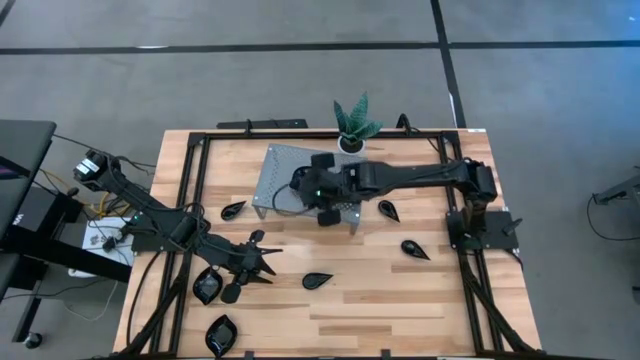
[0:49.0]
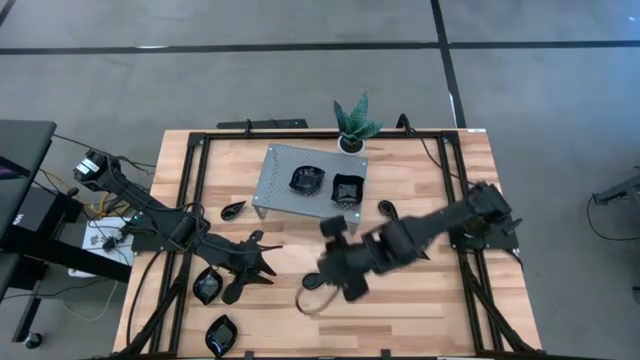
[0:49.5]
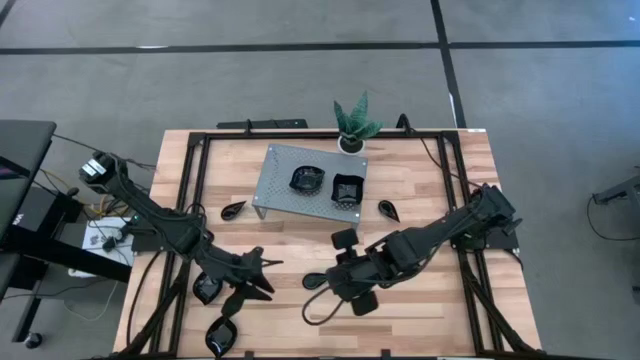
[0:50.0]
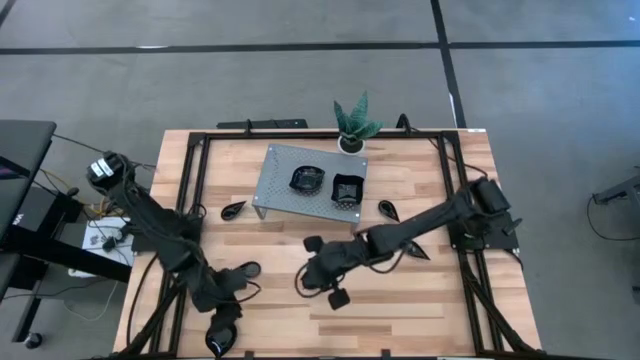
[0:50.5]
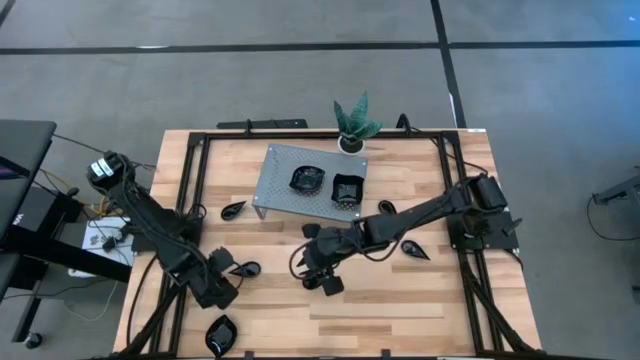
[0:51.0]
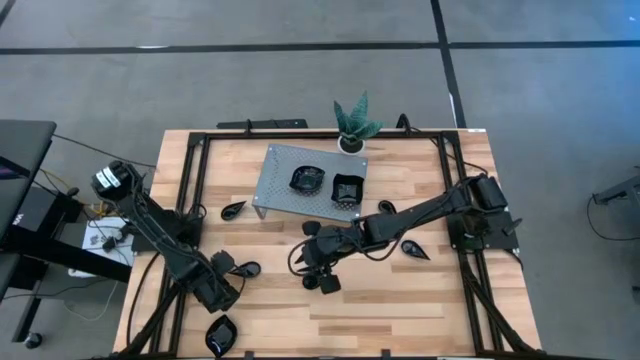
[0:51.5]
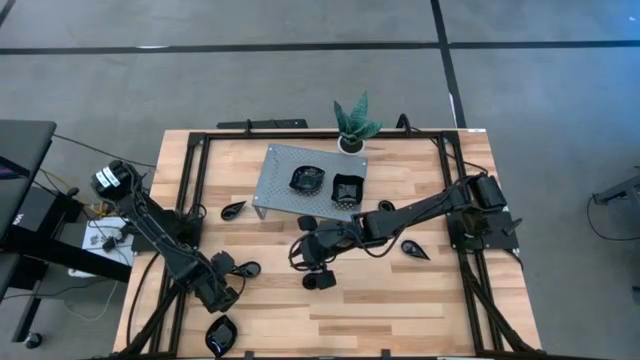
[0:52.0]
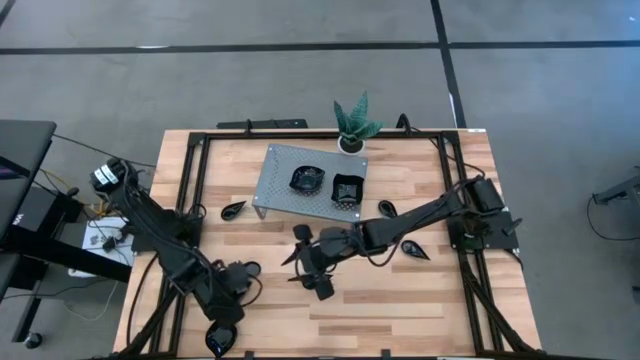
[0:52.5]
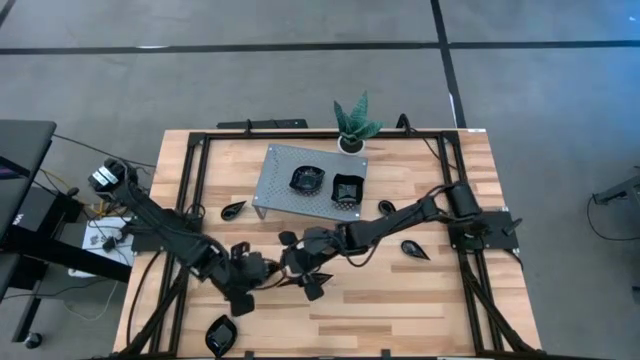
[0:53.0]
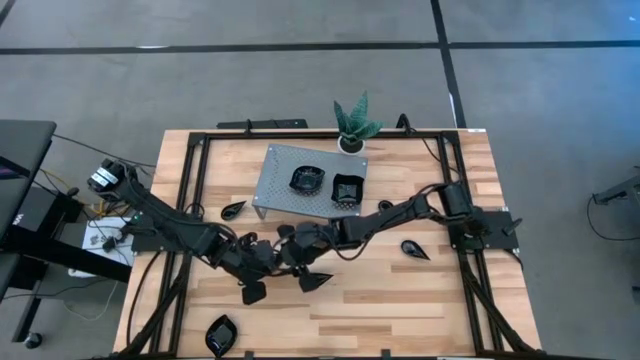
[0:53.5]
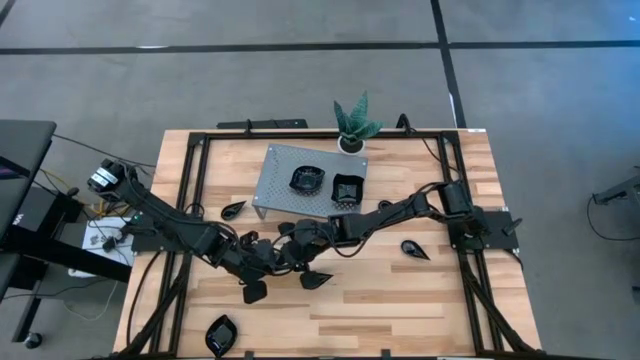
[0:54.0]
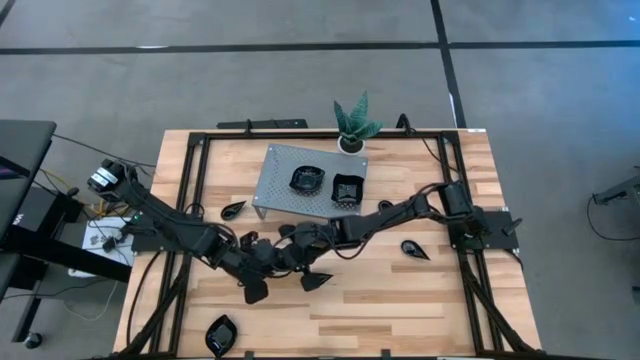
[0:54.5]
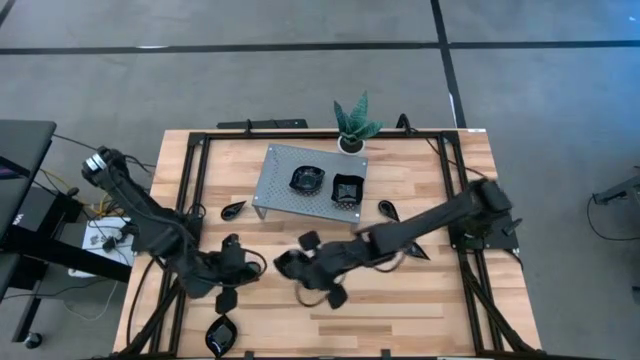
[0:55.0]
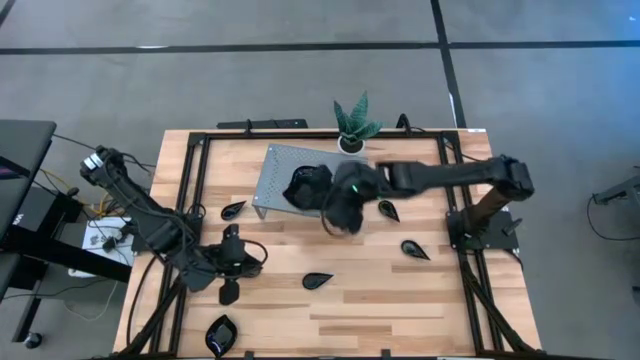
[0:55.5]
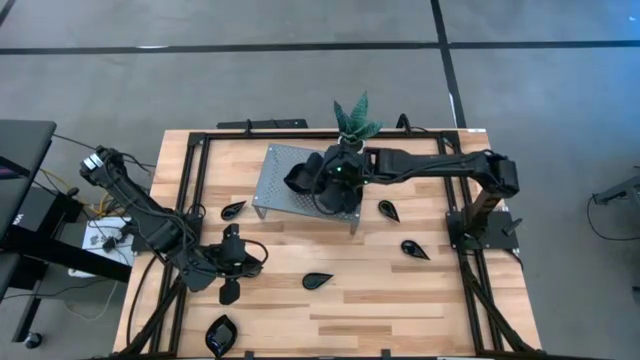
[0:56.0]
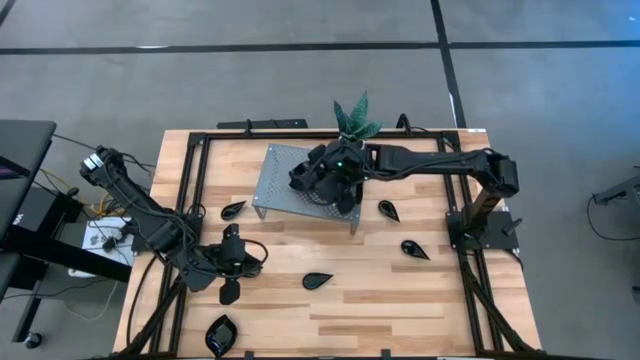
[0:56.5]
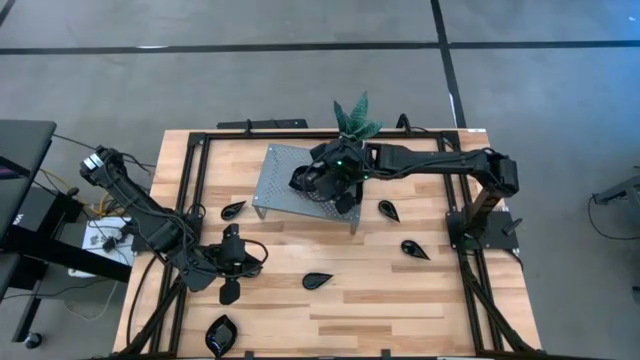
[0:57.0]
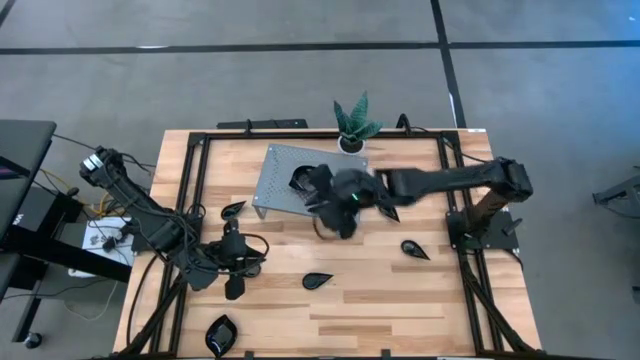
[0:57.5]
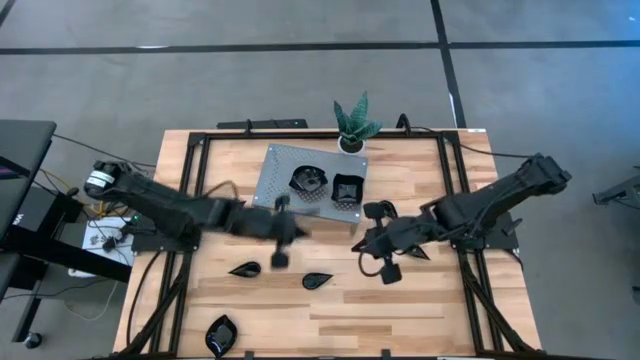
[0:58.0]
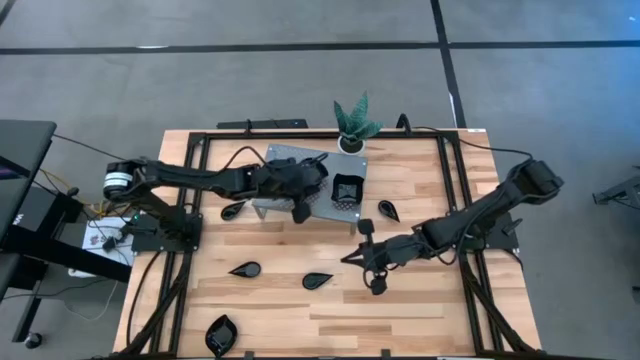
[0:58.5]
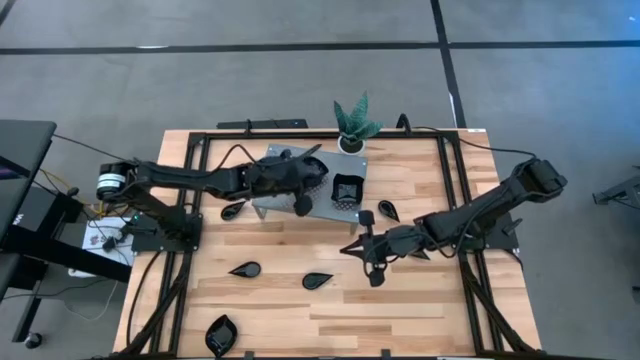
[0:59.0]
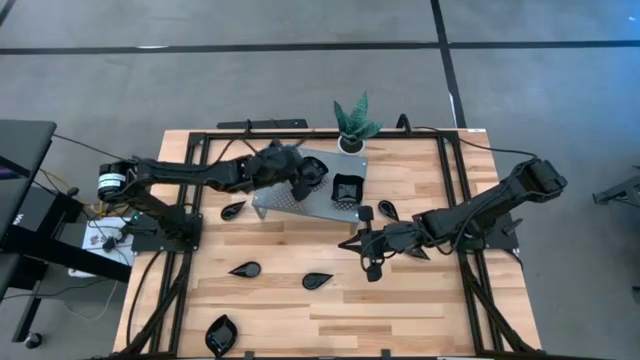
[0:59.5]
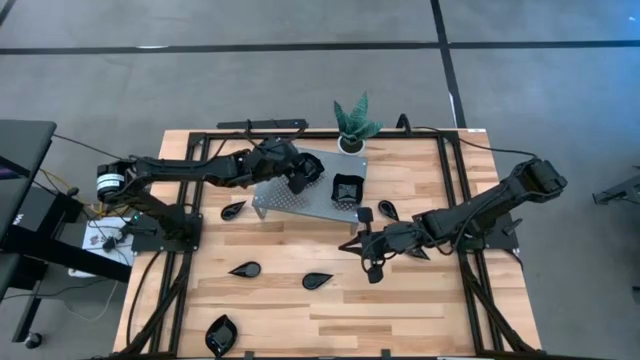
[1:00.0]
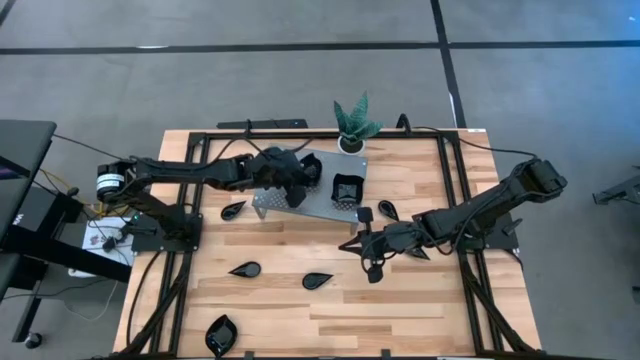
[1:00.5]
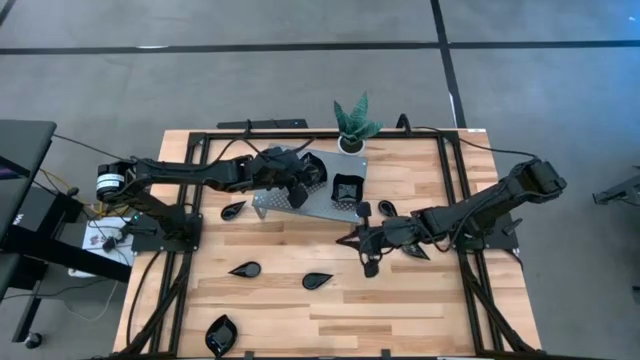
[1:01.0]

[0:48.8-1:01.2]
Task: Pick & Place Mini shaped plates
Stack the leaf shaped plate on top of the leaf shaped plates on the shelf

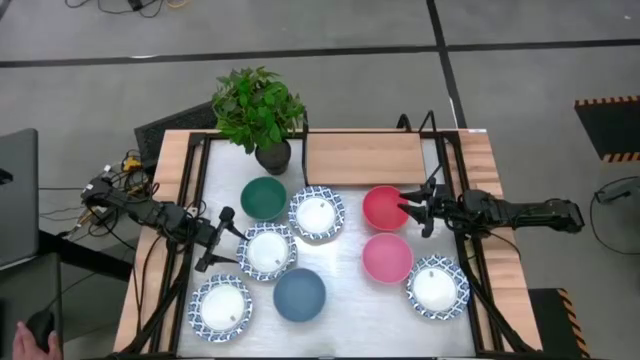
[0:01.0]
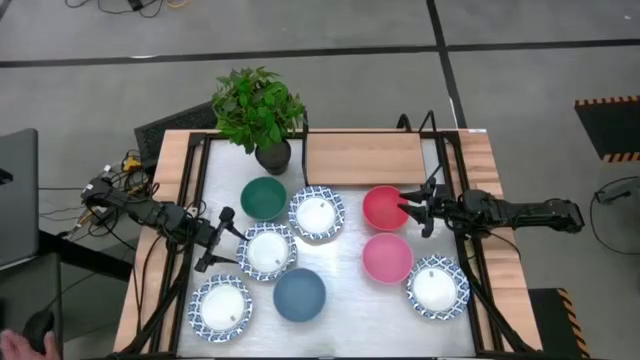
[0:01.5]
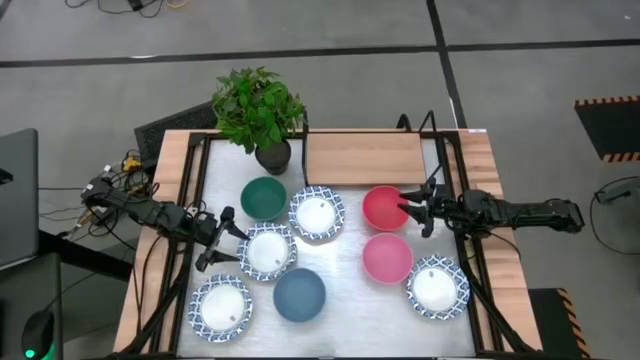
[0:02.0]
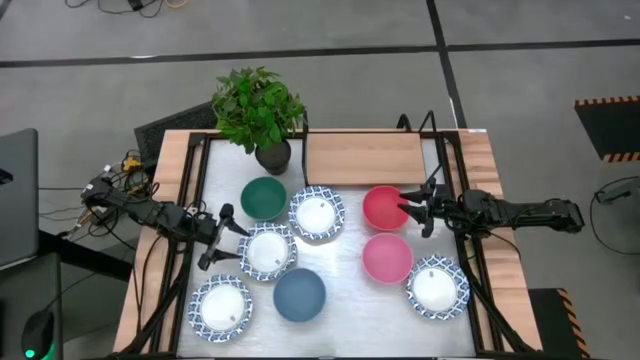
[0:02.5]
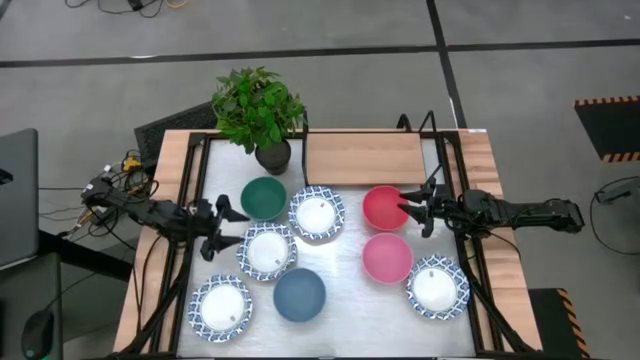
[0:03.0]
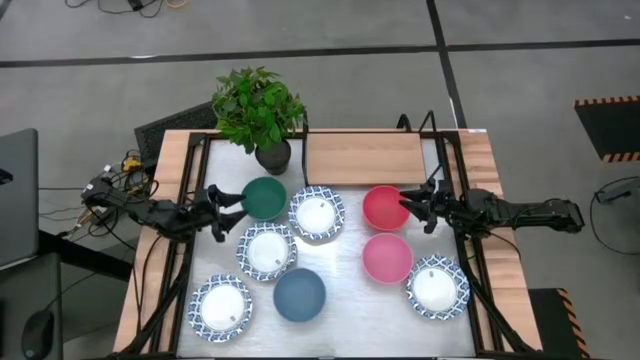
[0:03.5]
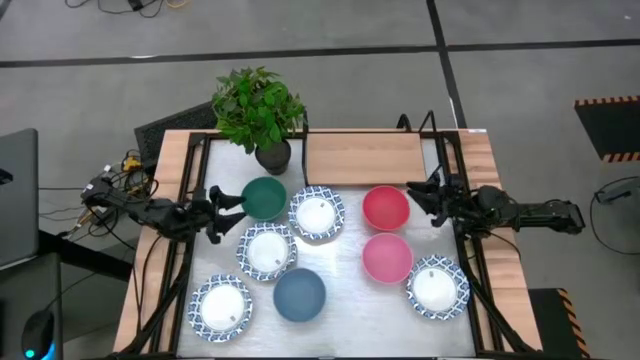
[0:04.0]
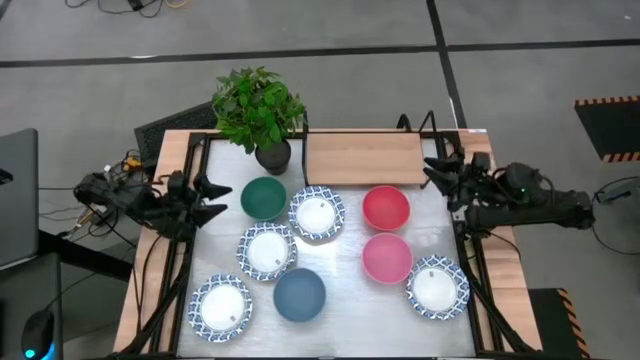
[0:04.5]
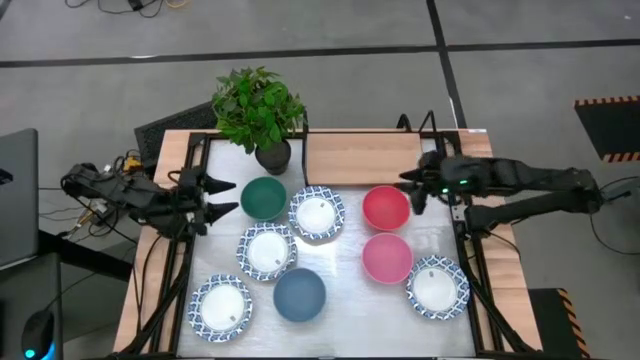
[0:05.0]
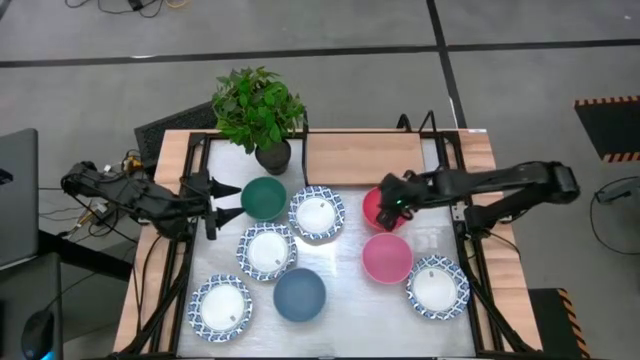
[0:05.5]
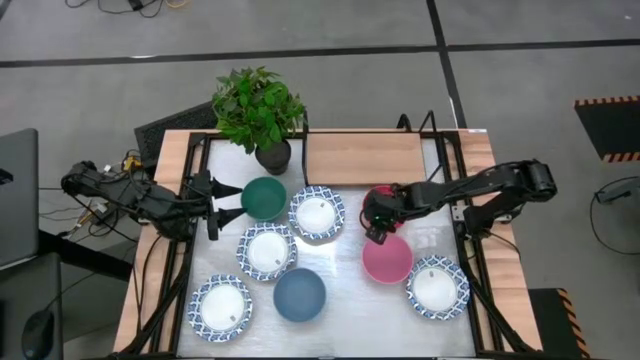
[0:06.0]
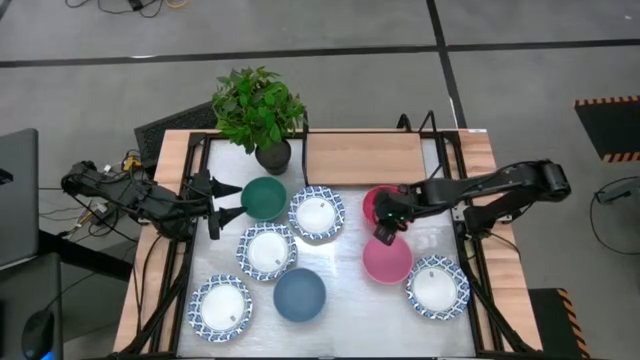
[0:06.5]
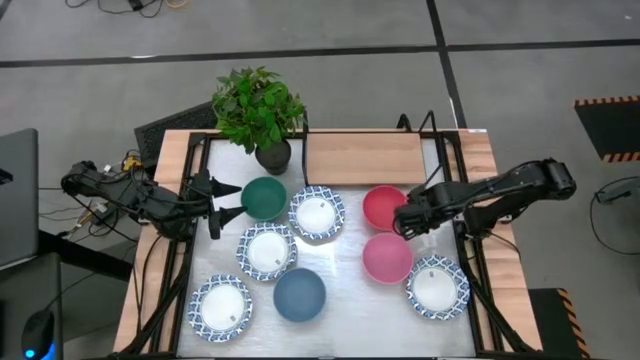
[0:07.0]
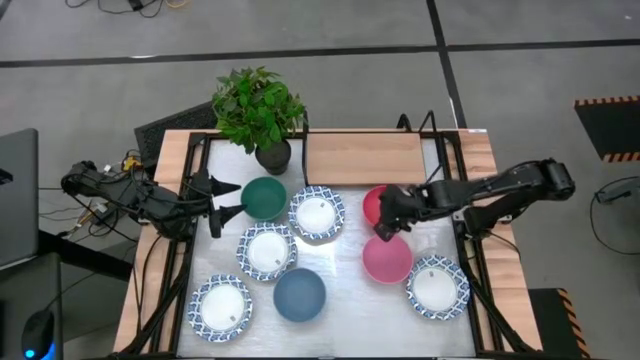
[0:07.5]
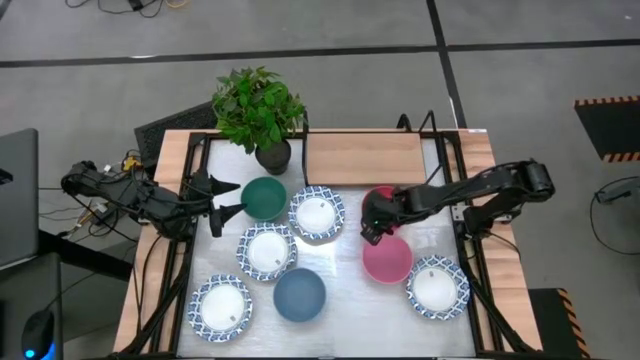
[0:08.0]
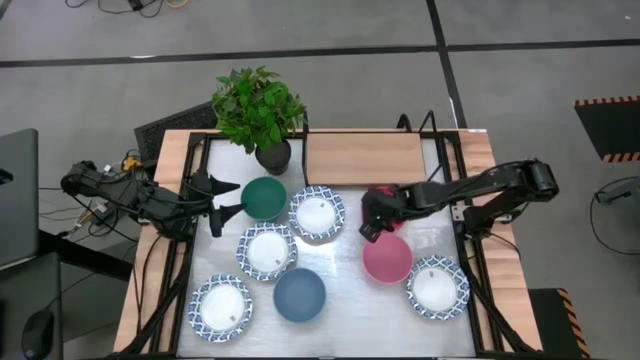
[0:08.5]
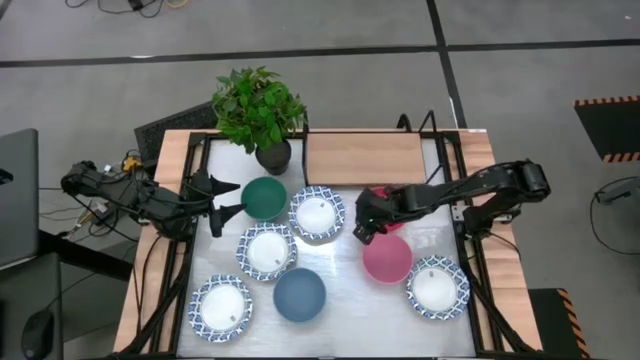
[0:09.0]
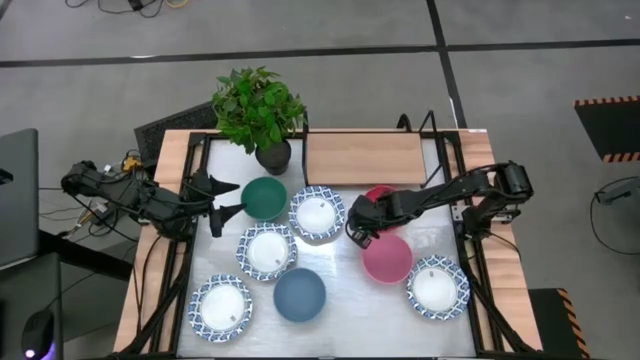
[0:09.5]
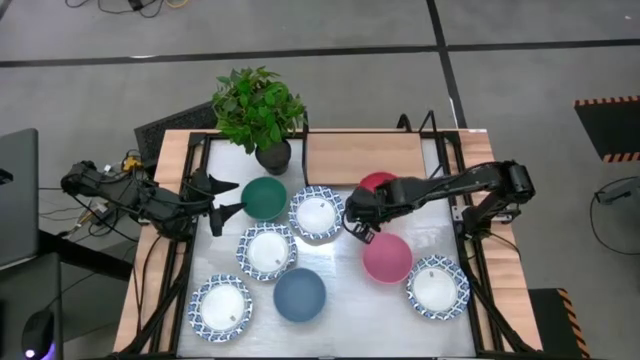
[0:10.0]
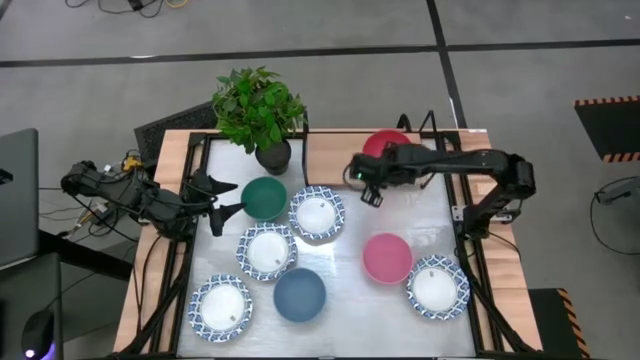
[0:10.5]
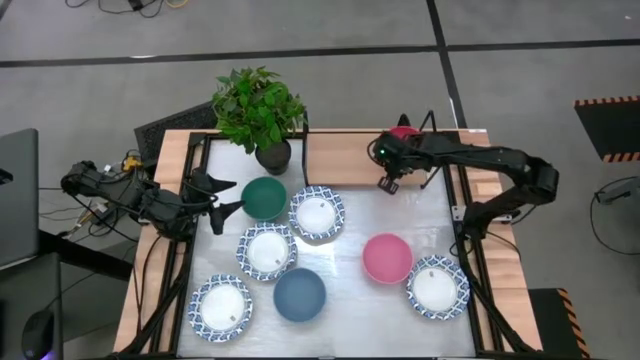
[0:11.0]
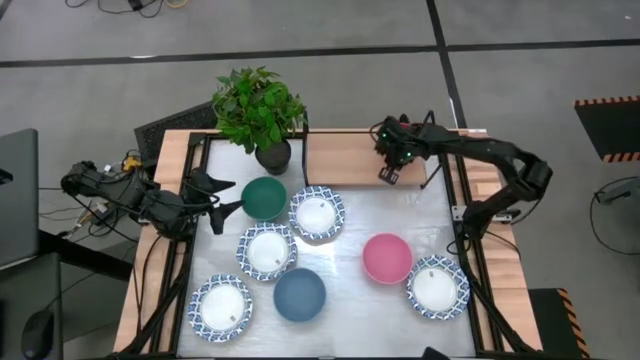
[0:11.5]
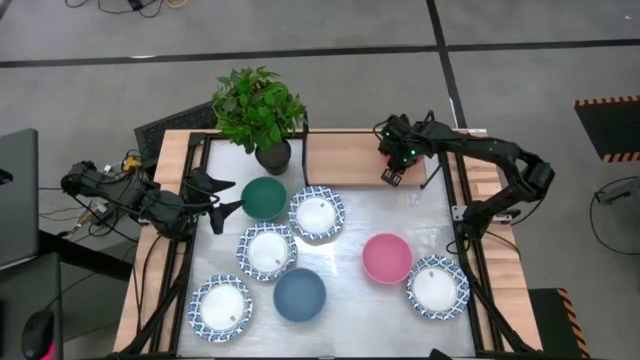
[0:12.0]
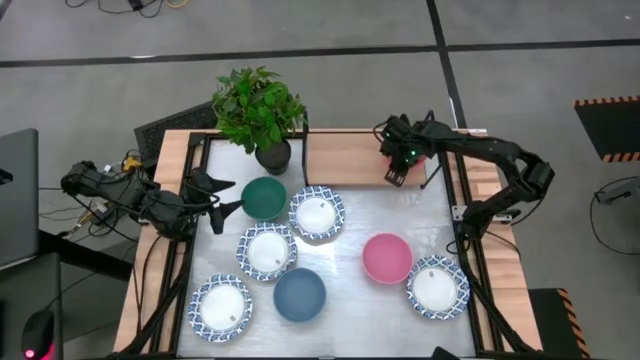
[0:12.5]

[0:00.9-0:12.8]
Task: Place and stack bowls onto a shelf
Put the orange bowl on the shelf
